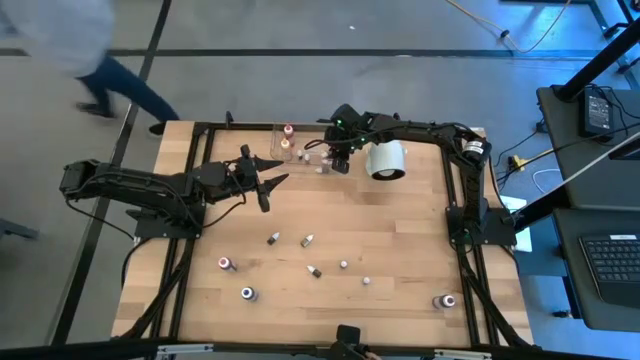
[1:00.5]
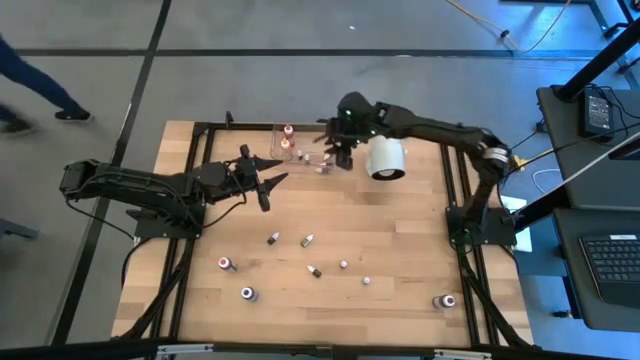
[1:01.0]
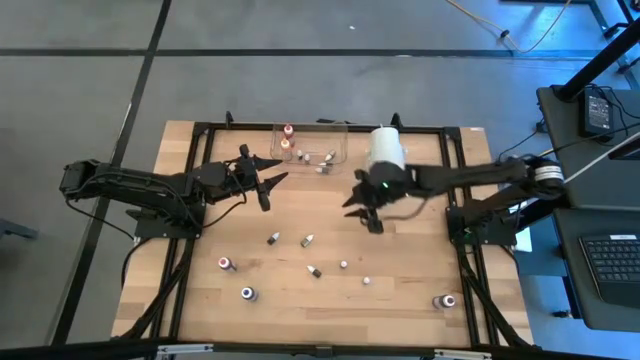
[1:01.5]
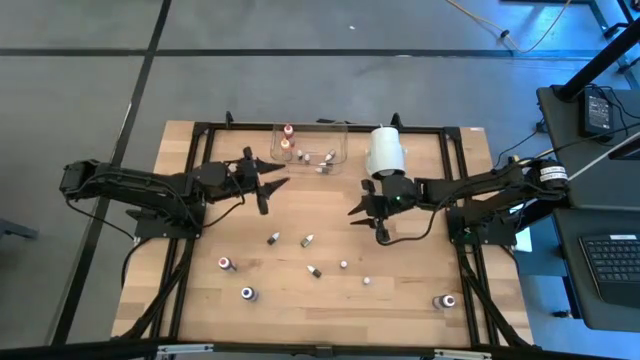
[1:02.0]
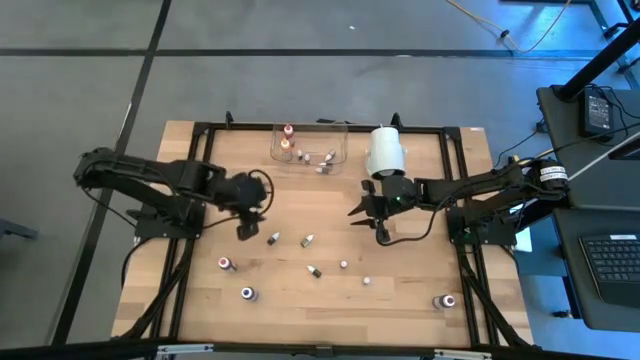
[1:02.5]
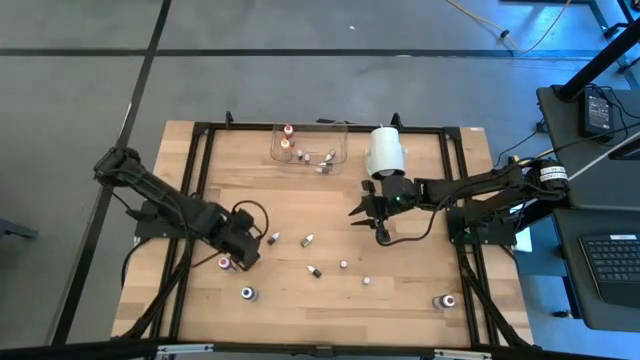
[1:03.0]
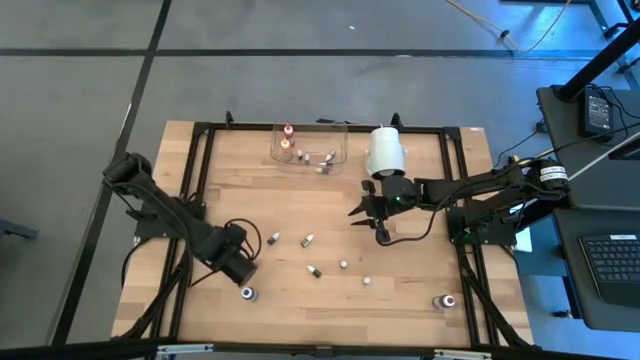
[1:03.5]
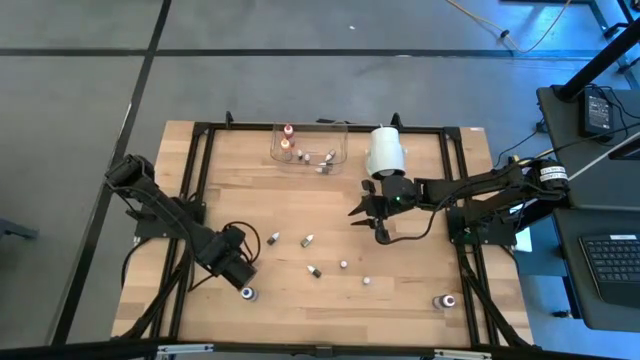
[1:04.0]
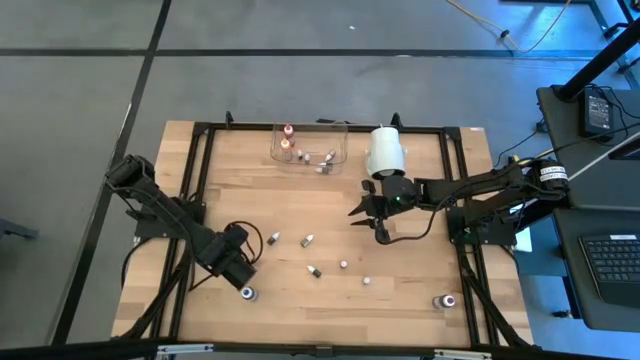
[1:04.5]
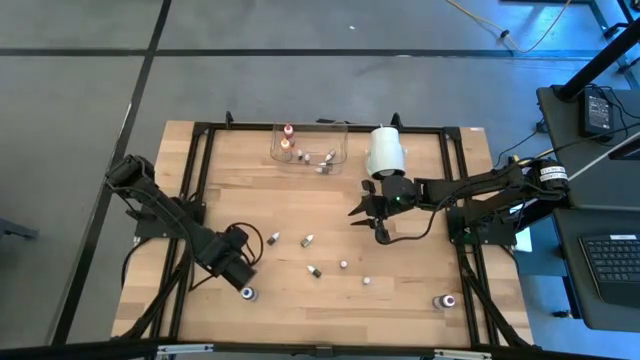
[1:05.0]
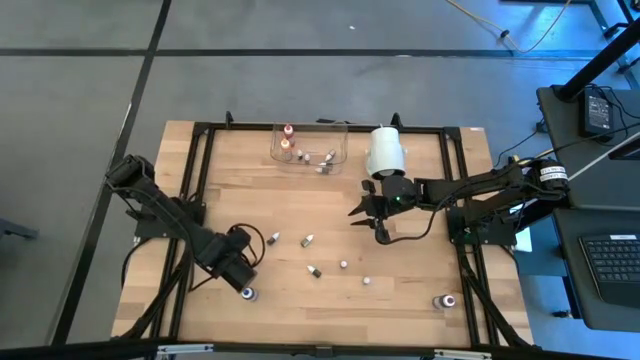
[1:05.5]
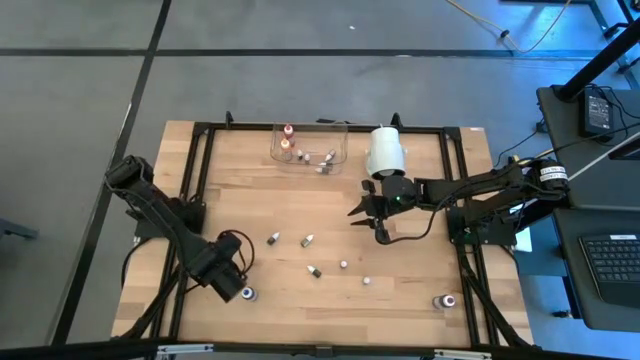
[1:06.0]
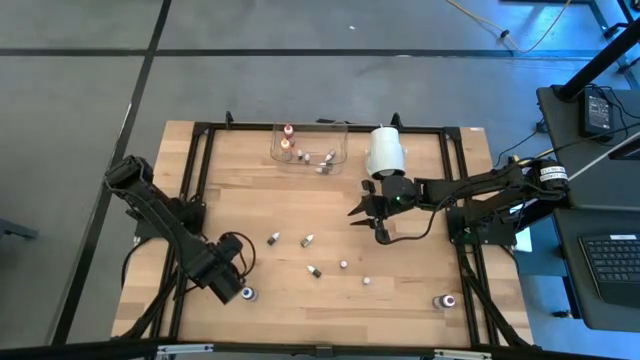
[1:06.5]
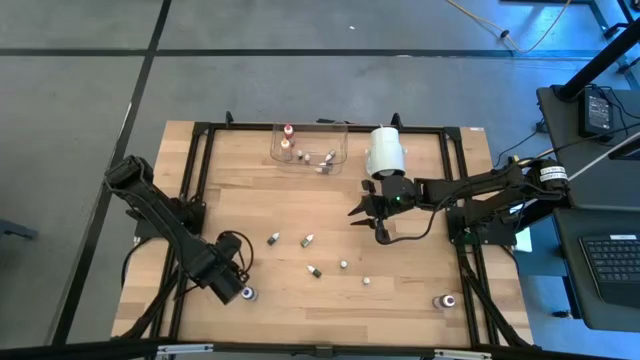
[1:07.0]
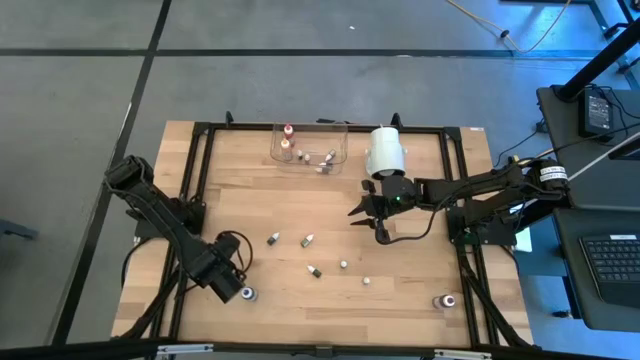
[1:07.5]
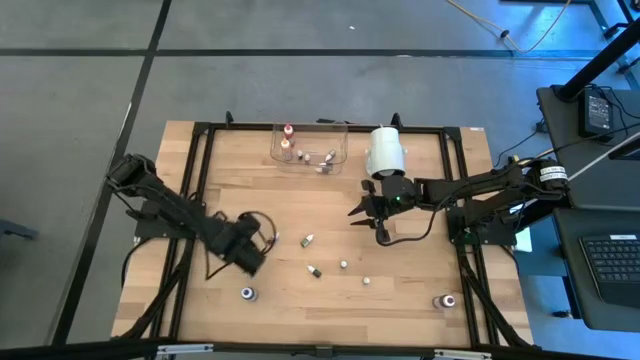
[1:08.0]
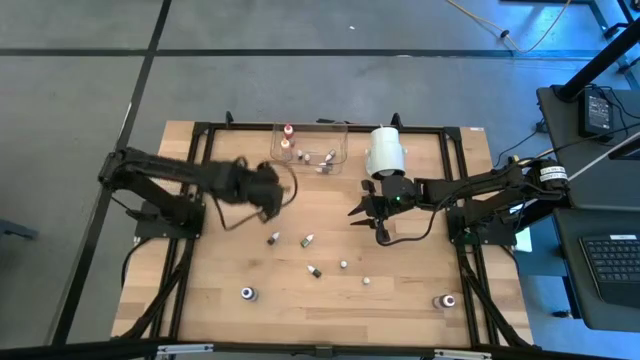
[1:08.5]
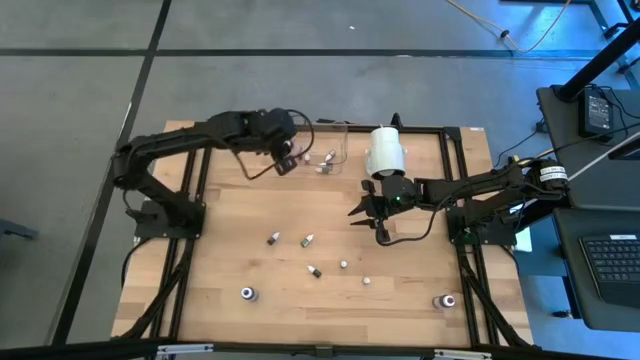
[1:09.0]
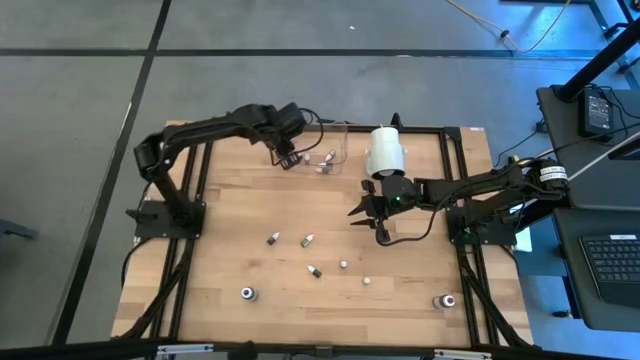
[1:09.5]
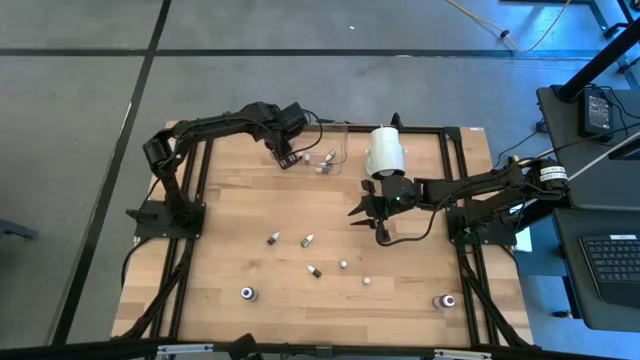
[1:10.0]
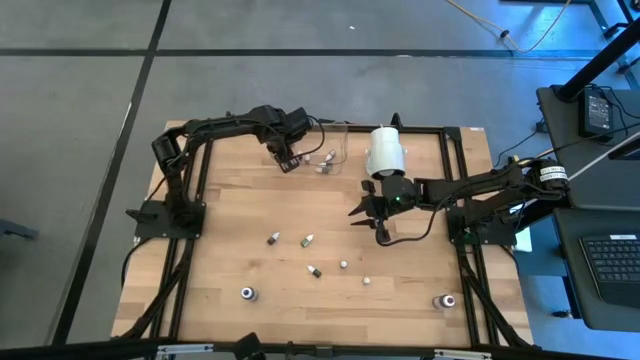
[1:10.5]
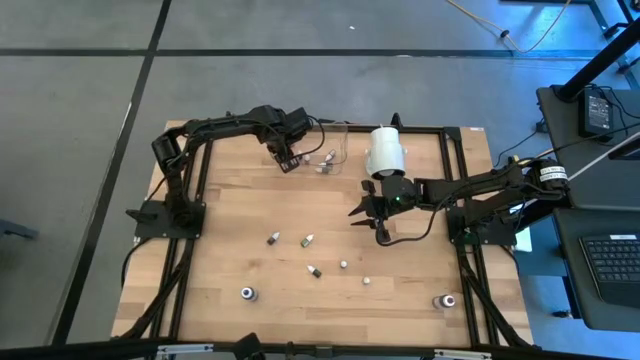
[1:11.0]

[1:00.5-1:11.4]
Task: Pick & Place food coloring
Put the pink food coloring bottle into the transparent bin

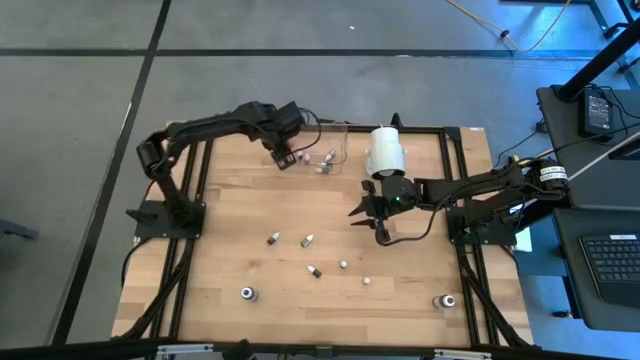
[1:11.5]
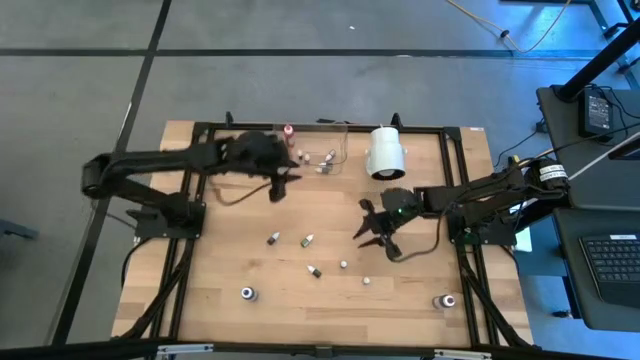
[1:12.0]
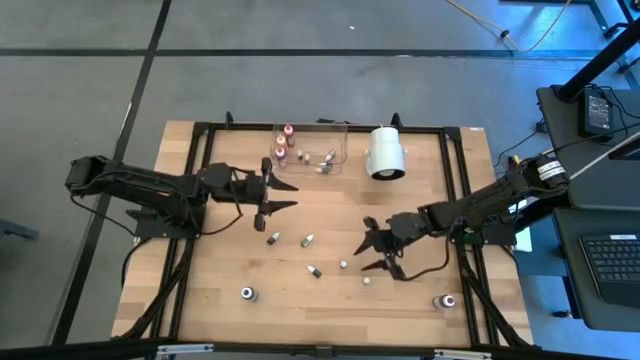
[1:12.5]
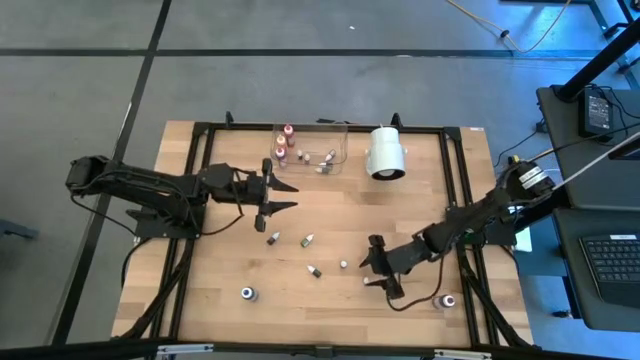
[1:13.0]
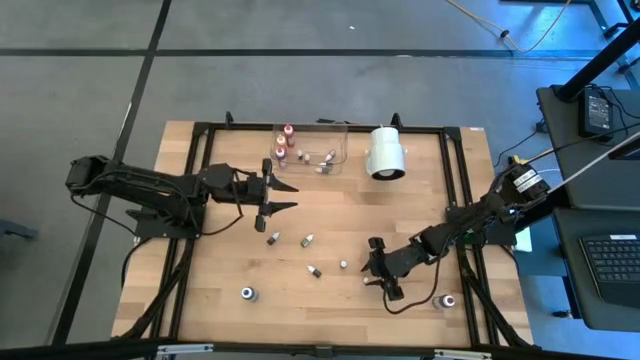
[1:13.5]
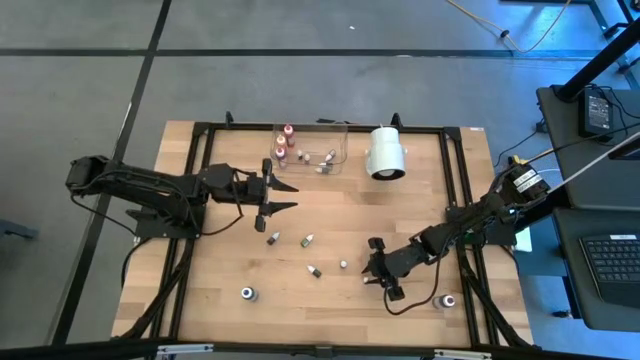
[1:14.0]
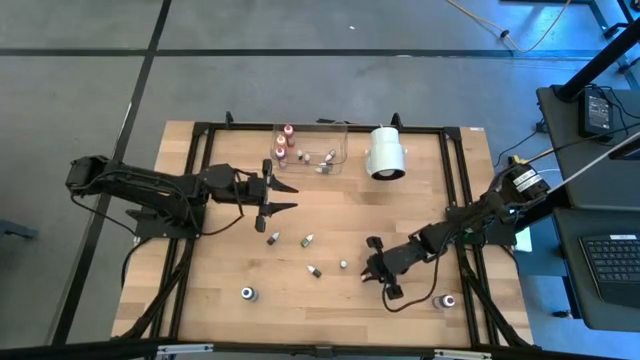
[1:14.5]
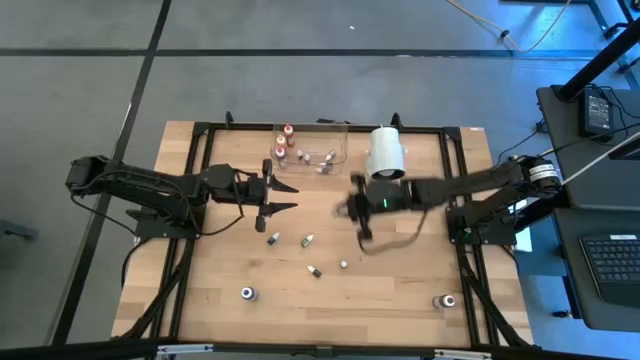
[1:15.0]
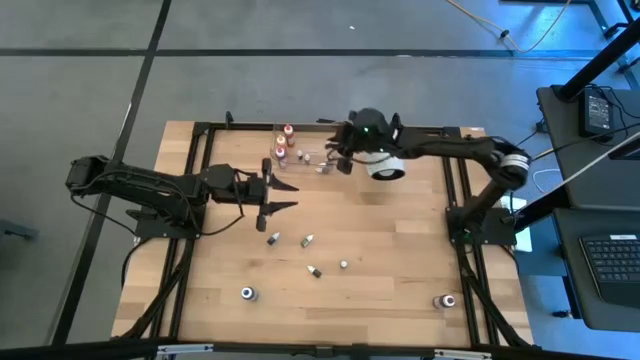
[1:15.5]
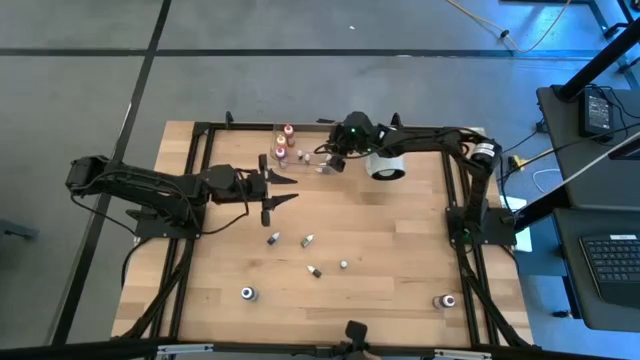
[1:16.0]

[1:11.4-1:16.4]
Put the black food coloring bottle into the transparent bin

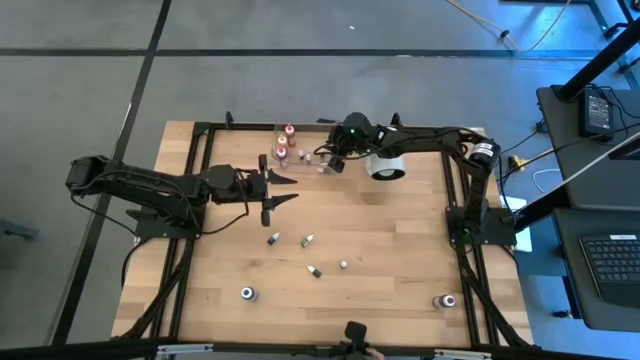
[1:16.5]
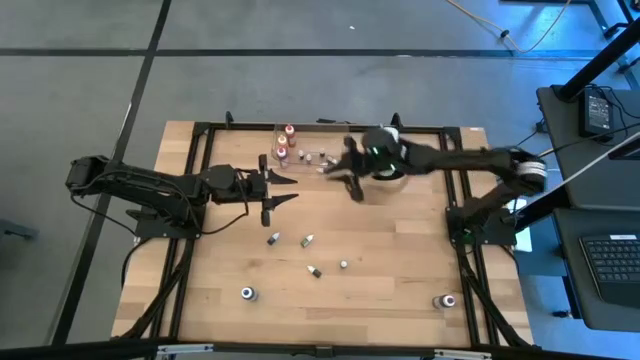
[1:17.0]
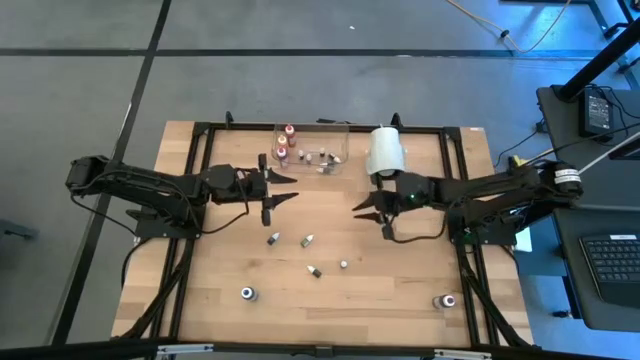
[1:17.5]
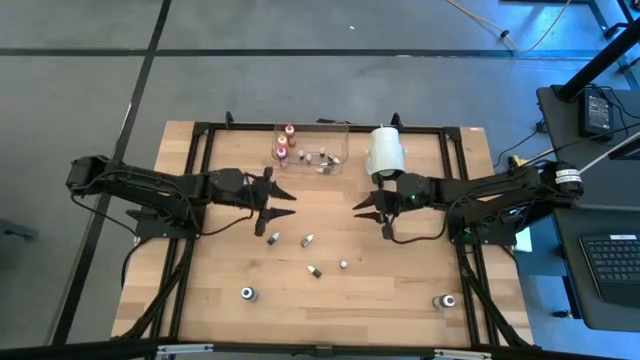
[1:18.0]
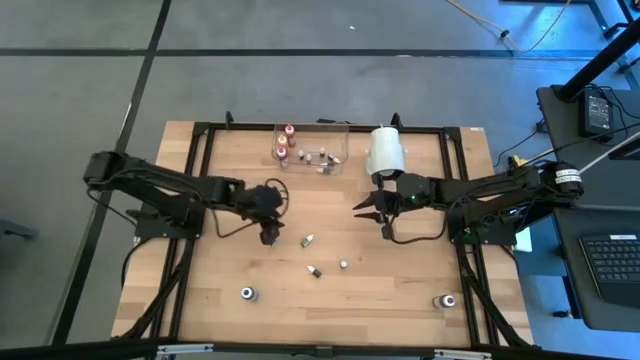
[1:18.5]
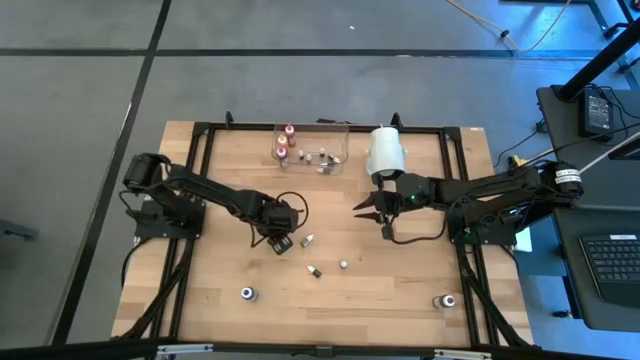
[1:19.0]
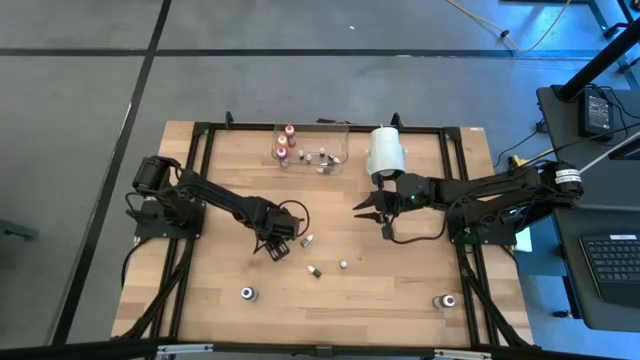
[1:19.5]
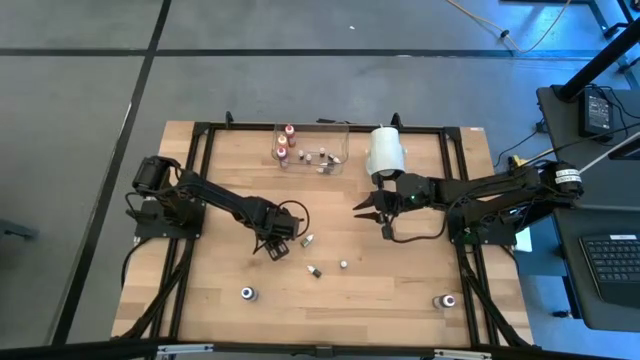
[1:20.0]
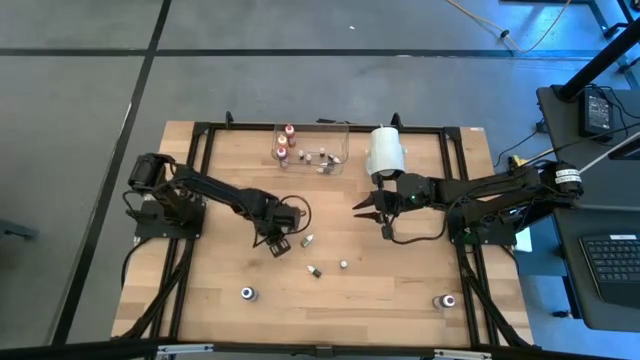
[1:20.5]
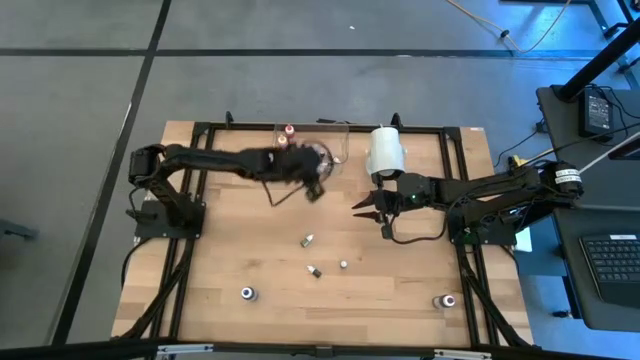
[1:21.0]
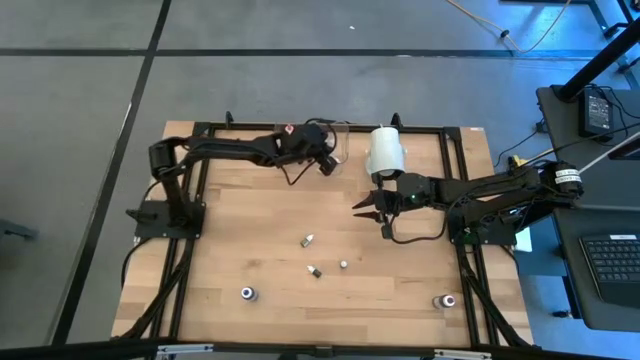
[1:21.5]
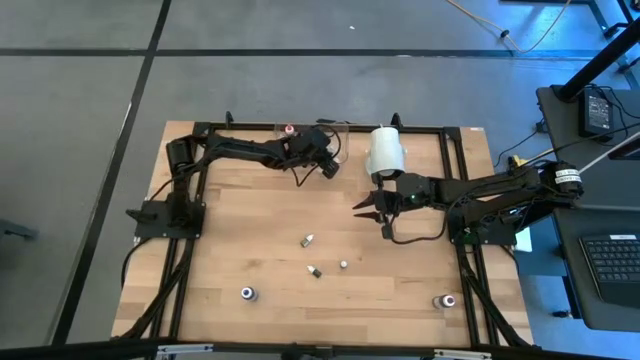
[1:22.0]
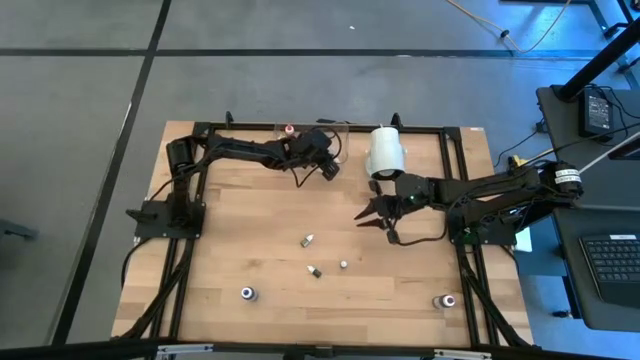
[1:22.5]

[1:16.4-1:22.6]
Put the blue food coloring bottle into the transparent bin
